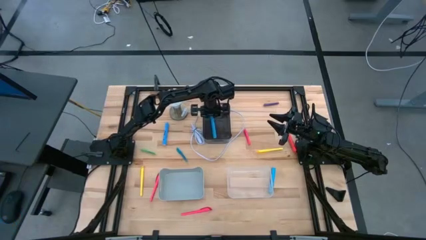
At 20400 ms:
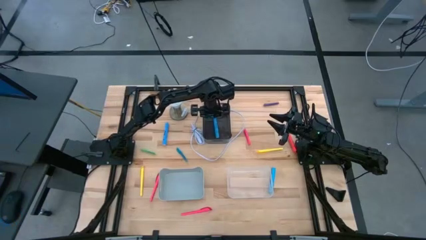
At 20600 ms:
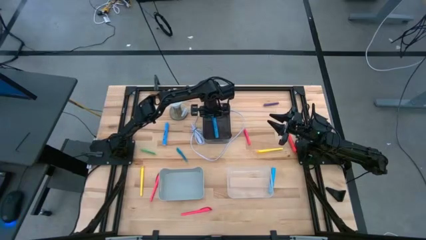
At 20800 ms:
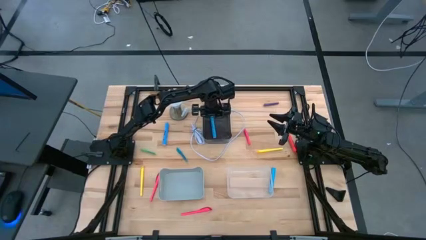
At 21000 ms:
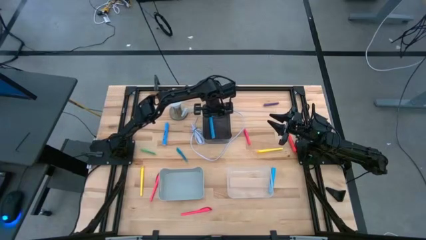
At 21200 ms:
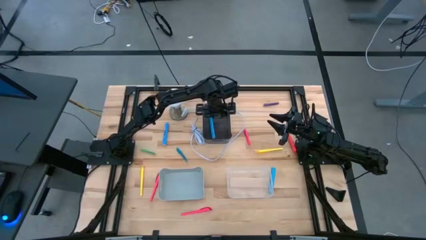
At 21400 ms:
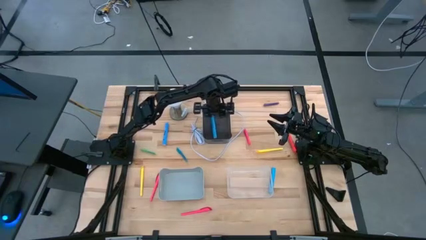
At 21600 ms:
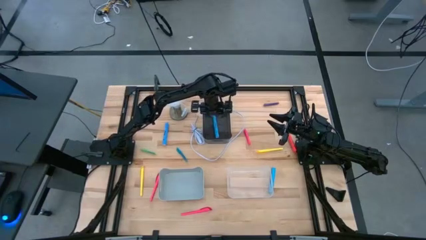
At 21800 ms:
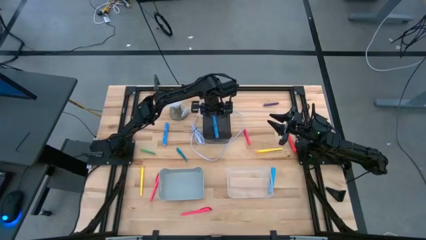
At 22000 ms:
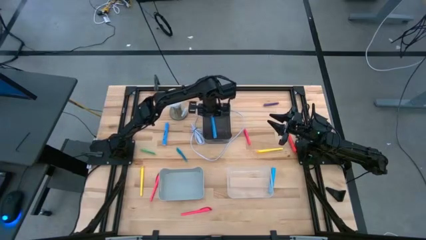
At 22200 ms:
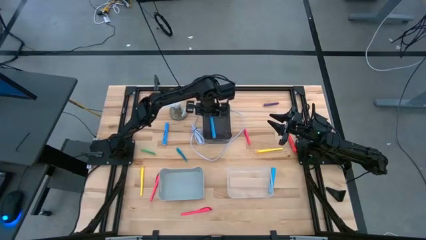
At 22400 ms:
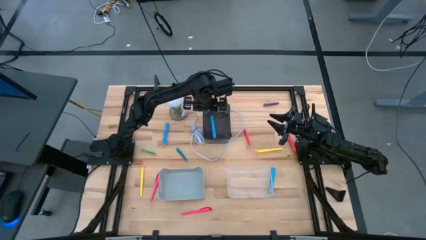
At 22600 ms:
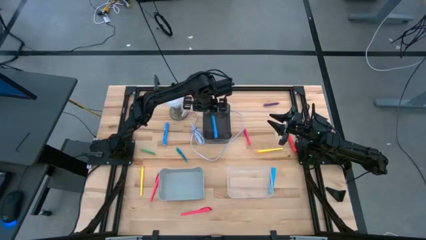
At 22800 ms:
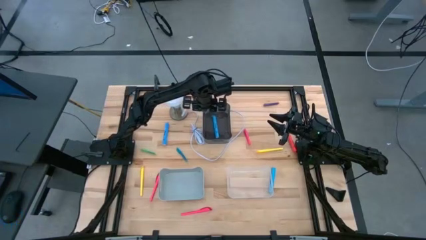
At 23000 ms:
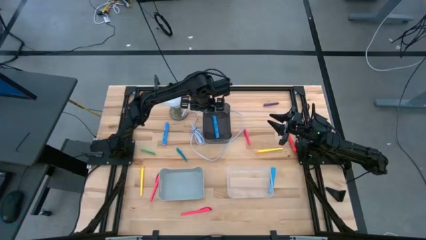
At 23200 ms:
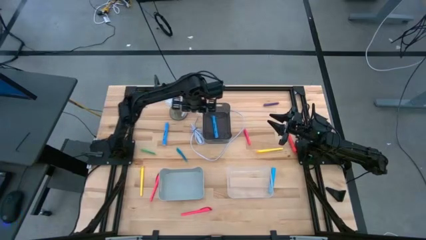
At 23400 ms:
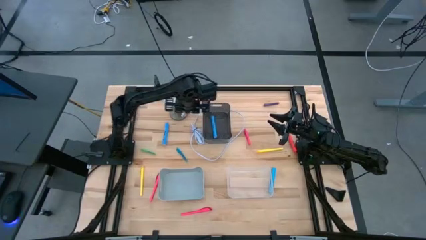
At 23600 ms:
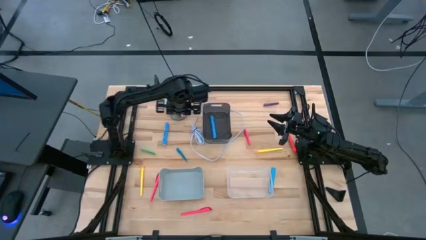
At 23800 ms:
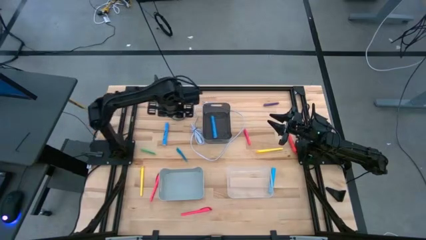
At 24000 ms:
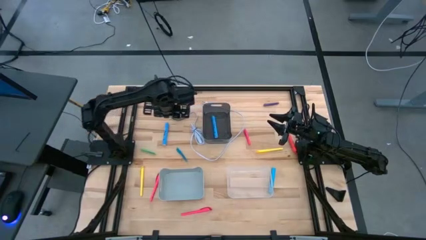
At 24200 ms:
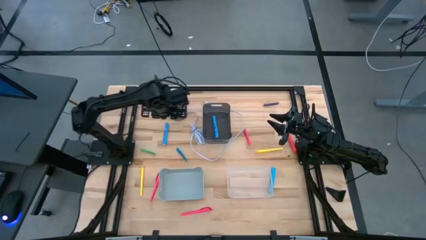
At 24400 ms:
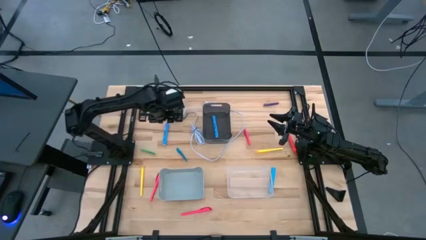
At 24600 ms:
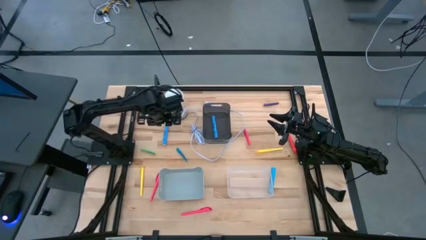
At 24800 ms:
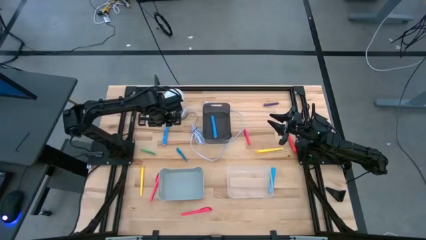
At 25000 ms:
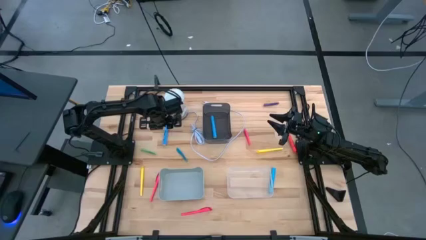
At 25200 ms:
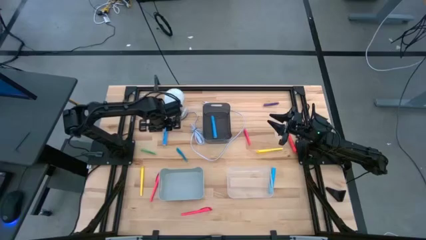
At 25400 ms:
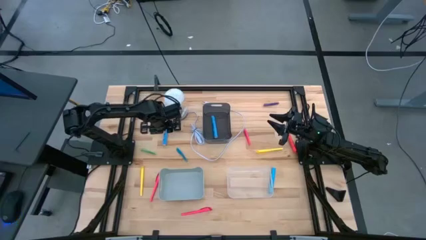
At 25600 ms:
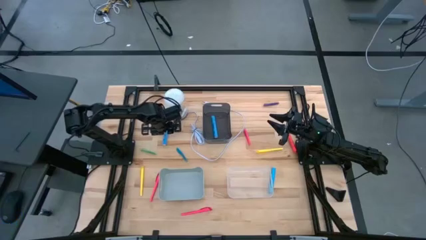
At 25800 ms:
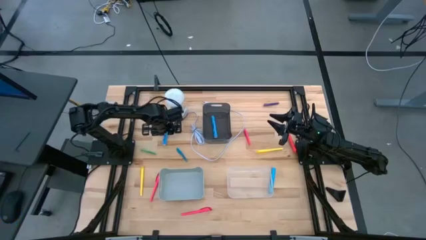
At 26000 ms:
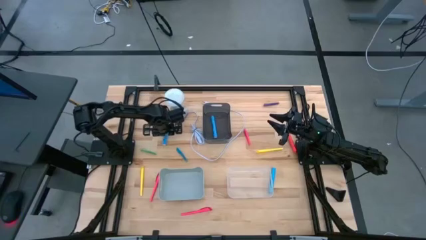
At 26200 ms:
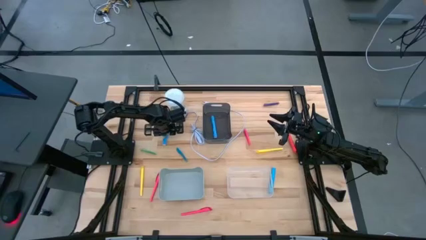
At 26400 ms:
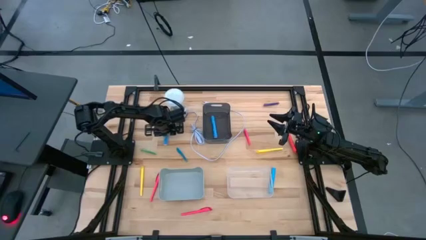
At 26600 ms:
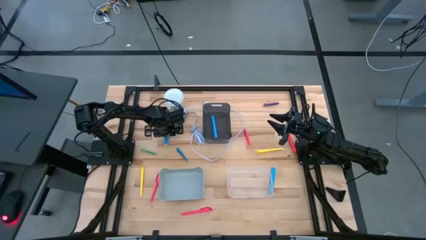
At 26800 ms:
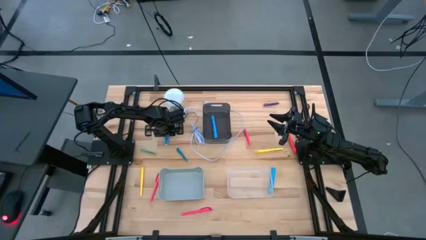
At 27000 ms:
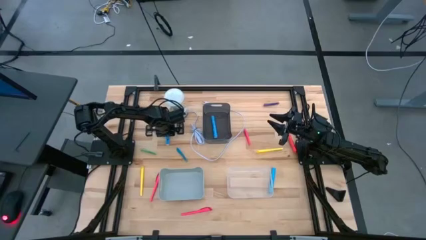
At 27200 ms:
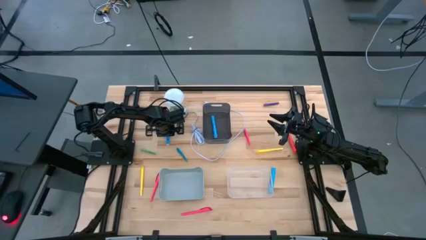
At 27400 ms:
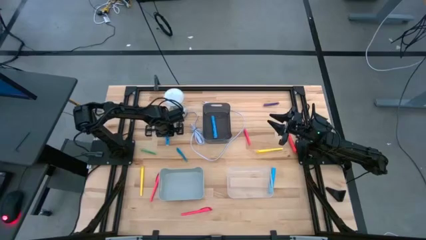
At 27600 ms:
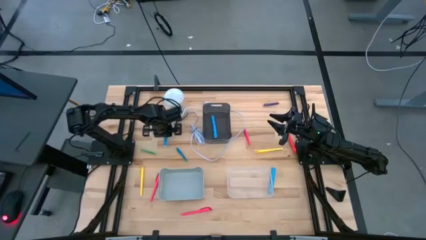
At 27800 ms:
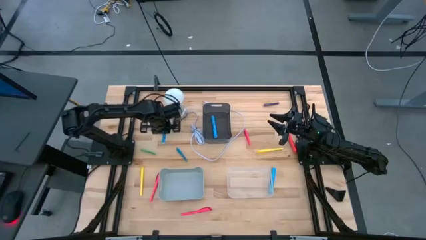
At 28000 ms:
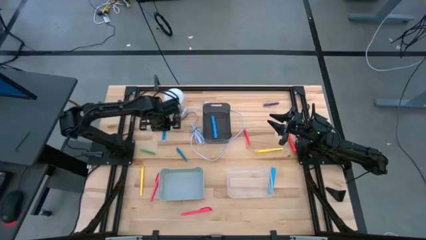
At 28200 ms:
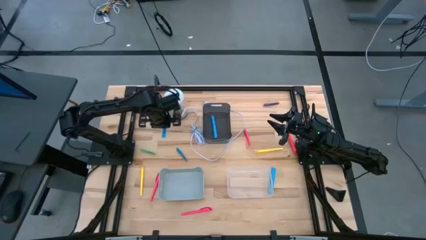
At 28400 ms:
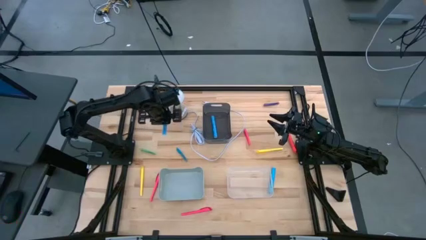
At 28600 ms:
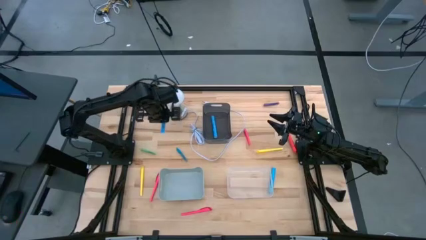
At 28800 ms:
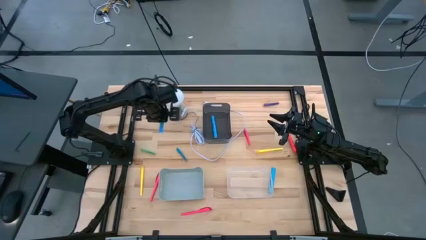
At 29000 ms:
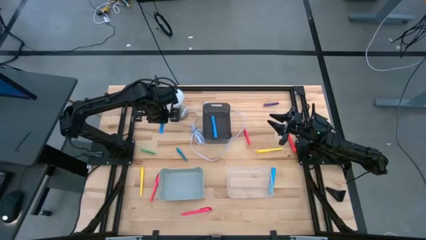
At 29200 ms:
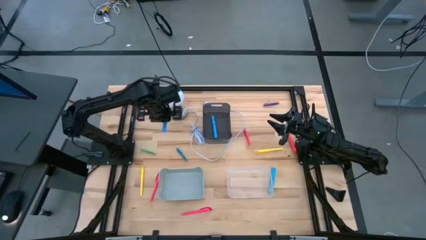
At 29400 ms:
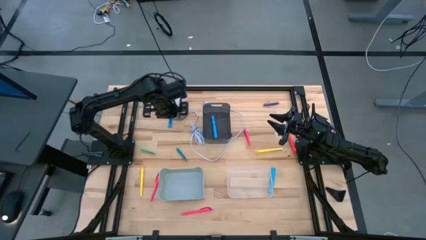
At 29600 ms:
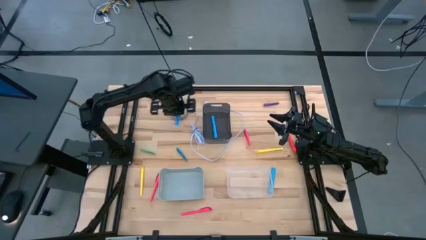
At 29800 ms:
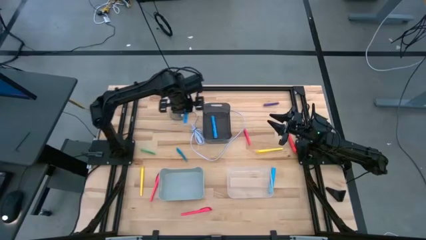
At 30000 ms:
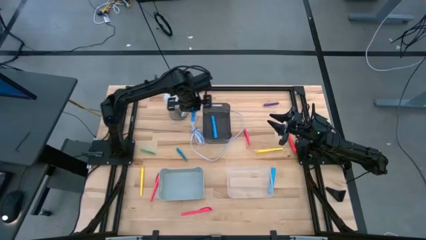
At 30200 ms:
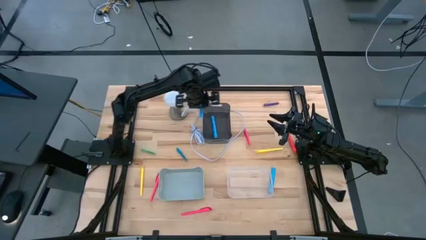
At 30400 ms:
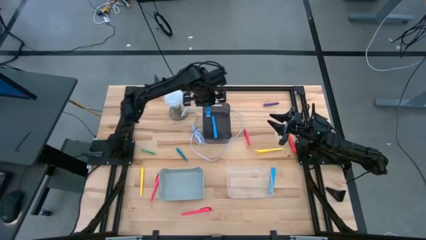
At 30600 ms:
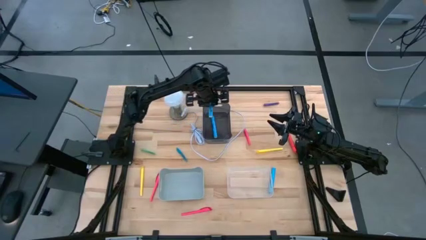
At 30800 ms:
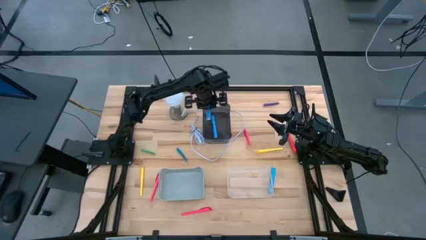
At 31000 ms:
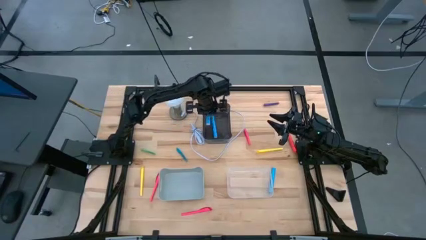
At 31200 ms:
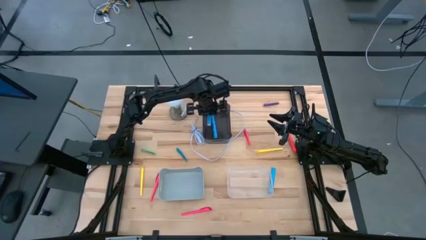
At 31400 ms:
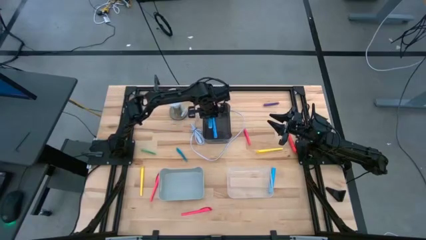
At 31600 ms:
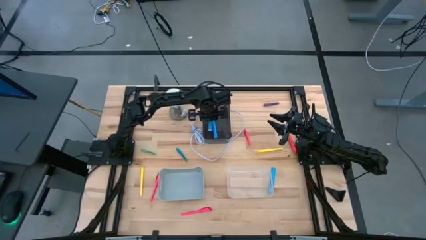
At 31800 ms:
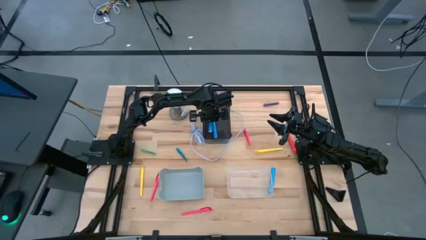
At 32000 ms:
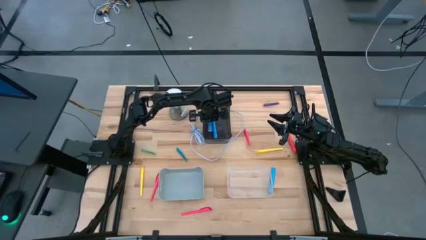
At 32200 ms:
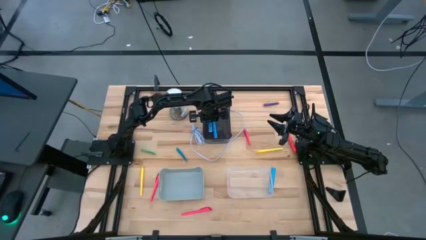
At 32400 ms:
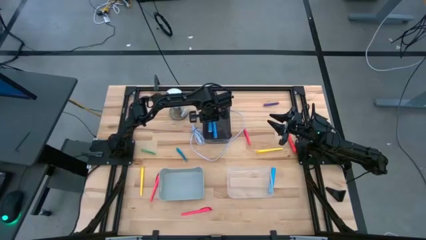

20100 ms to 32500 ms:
Task: Pick & Place Markers
Put the top blue highlighter pen into the black bin

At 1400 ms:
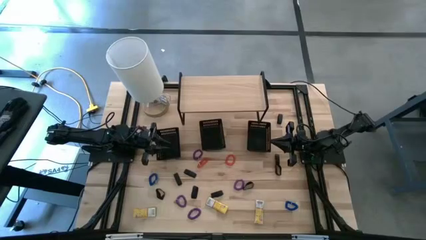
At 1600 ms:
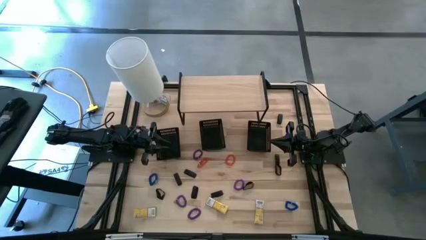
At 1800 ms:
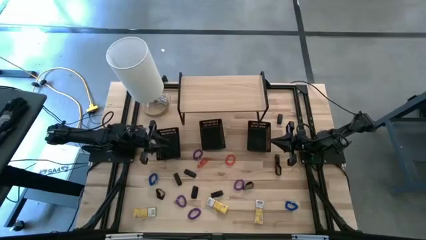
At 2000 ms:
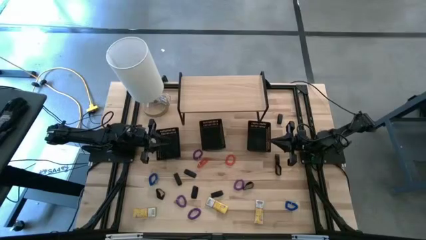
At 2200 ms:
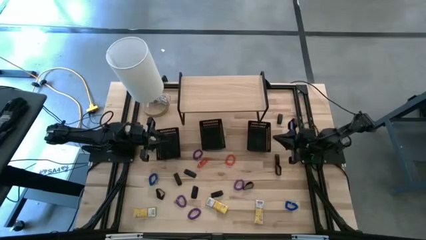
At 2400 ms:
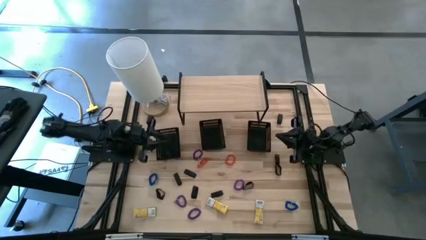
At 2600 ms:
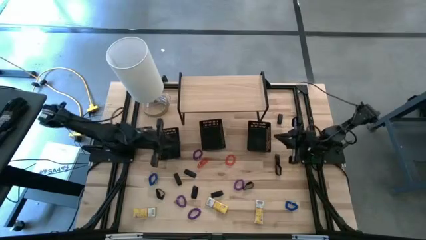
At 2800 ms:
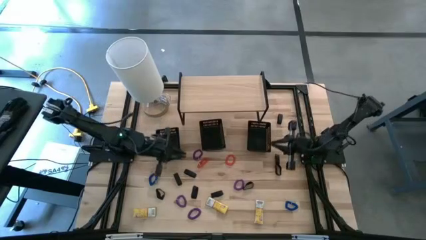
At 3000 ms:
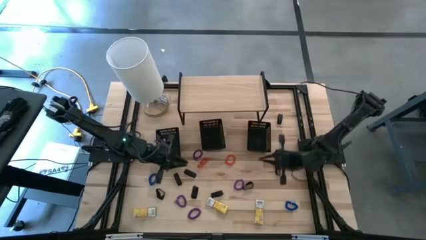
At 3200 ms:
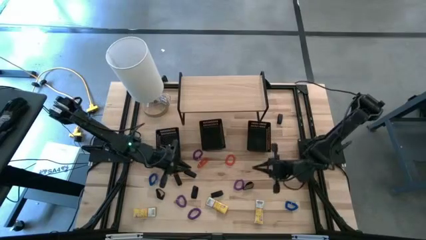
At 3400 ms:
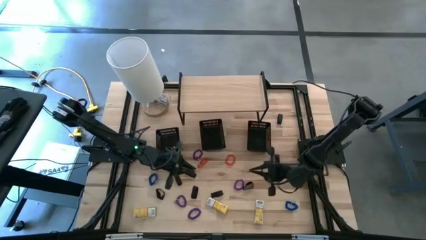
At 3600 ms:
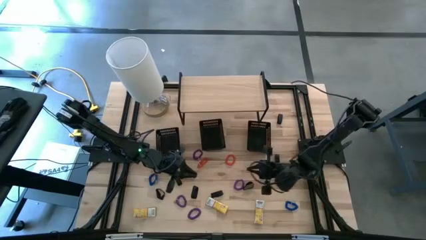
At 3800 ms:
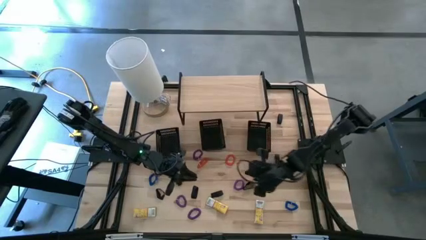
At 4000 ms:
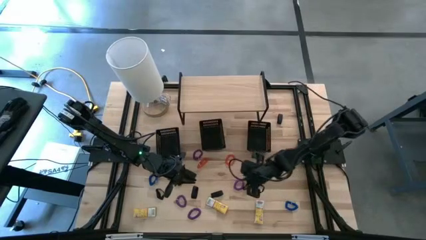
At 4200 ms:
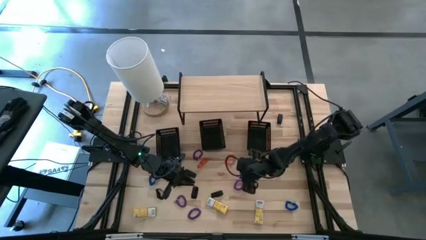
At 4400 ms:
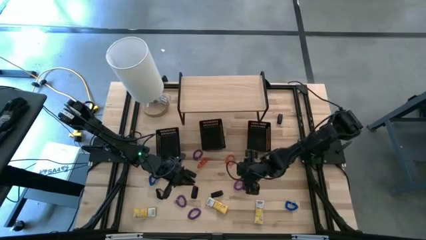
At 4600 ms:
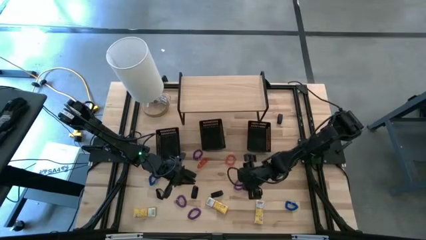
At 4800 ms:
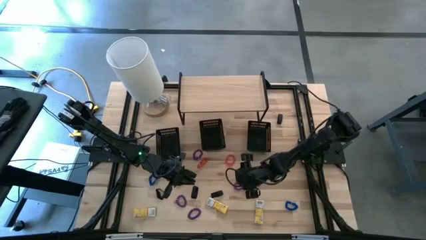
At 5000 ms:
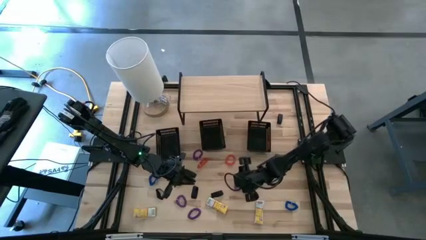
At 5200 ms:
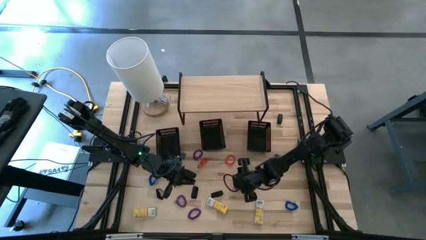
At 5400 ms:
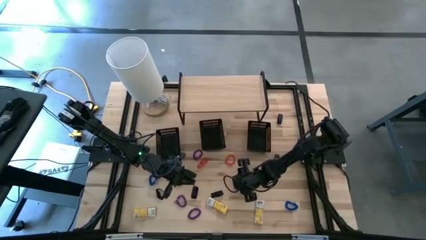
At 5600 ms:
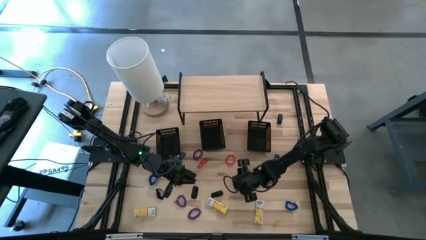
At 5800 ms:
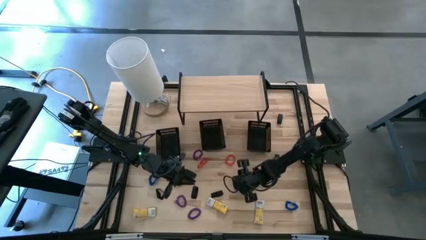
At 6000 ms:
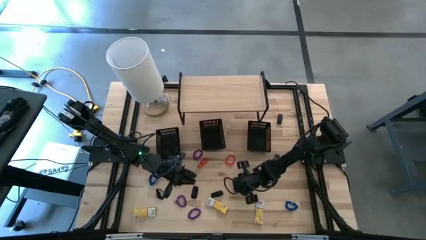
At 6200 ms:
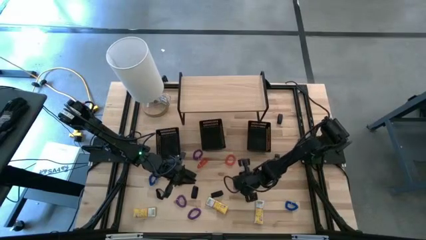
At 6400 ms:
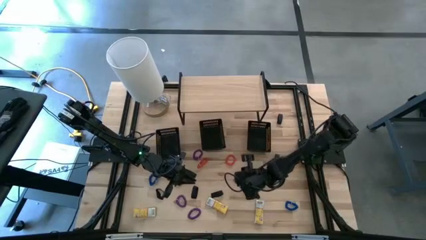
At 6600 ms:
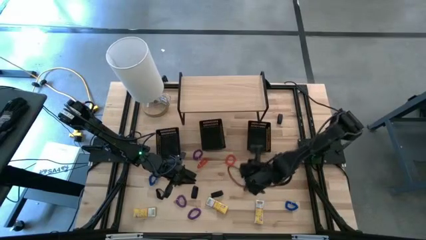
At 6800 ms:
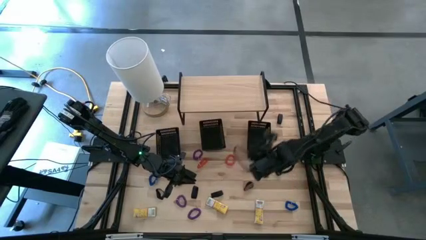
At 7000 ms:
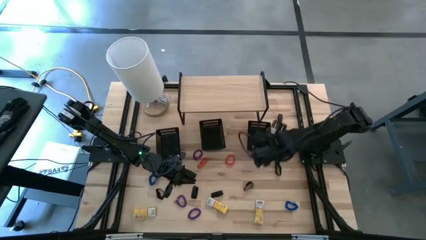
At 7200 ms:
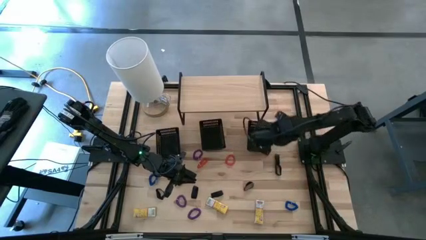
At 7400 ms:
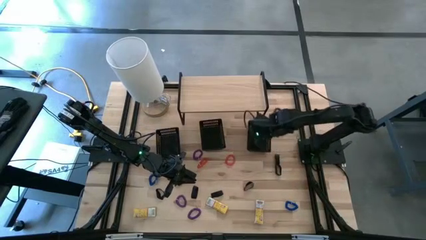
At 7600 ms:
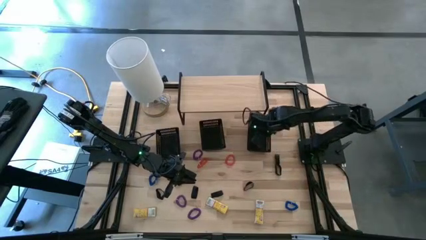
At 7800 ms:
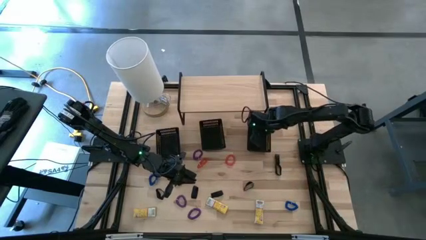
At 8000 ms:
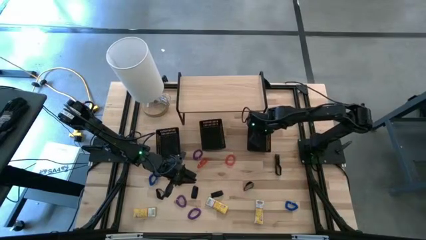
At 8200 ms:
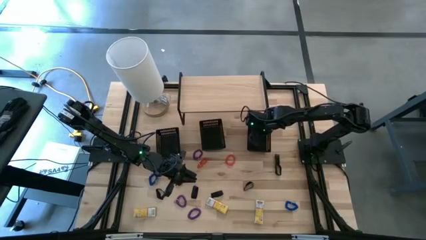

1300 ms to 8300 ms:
Task: Pick & Place Office Desk Supplies
Put the purple spring keychain into the right black bin
